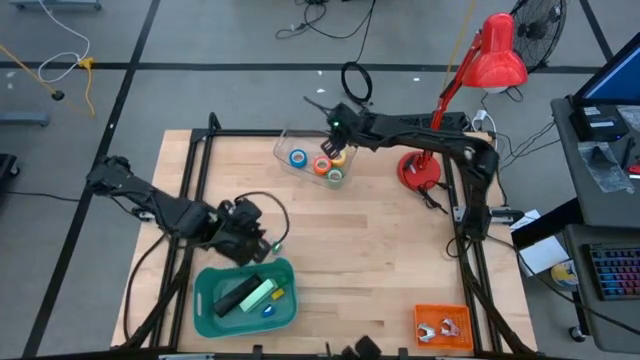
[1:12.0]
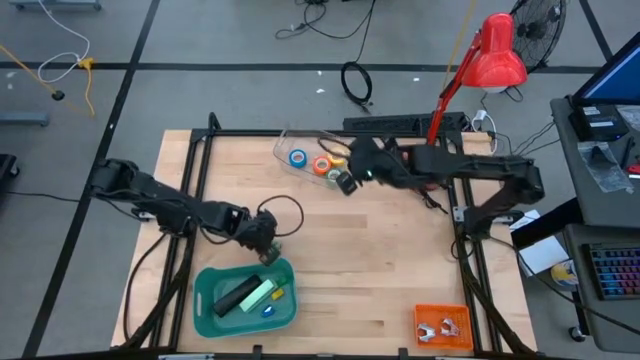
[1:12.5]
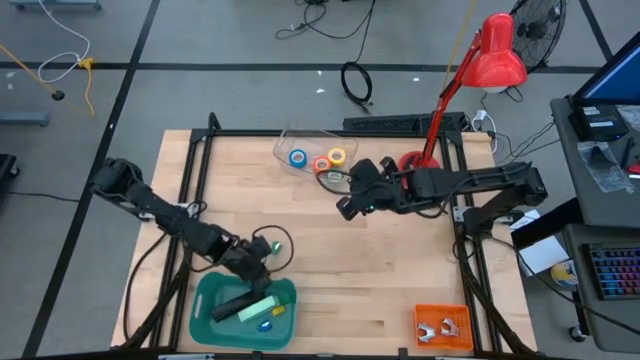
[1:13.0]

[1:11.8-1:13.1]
Task: Pick and place Stapler, Stapler remover, tape
Adjust the green bin

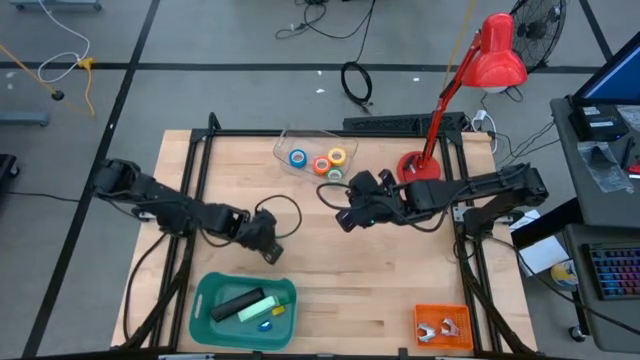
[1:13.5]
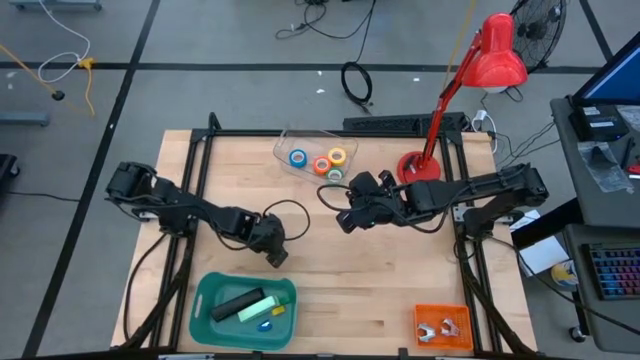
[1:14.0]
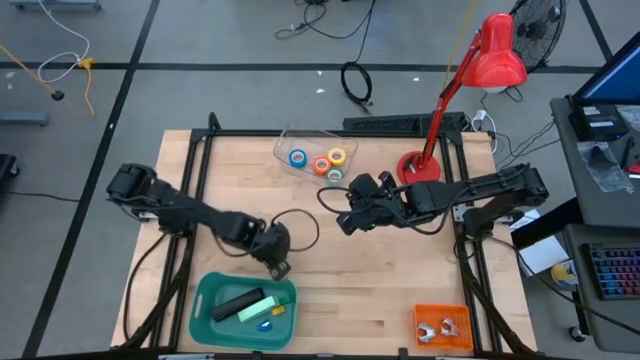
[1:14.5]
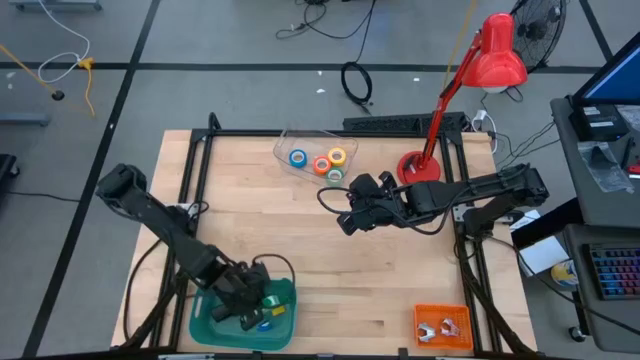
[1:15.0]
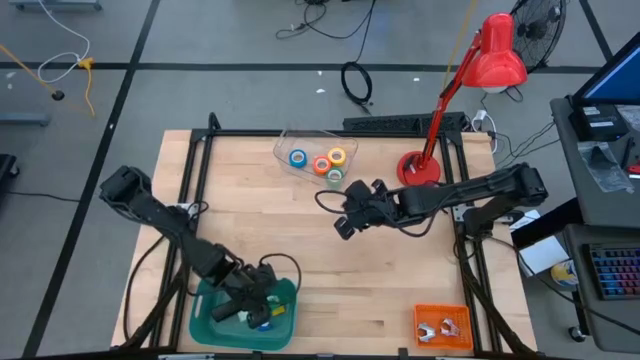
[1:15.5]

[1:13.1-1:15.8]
Put the small green stapler into the green bin

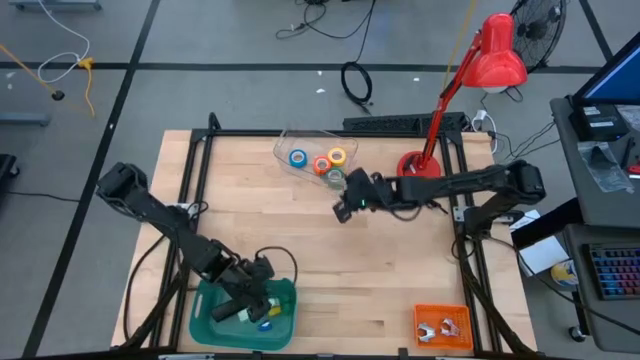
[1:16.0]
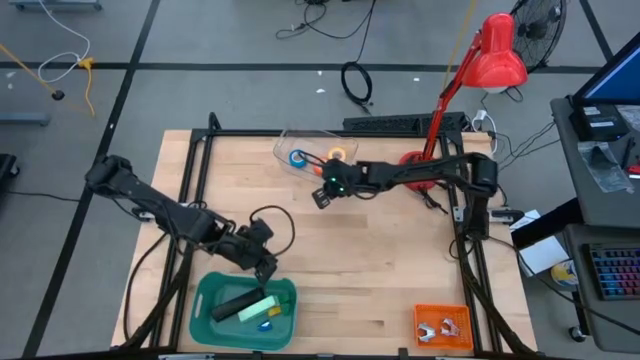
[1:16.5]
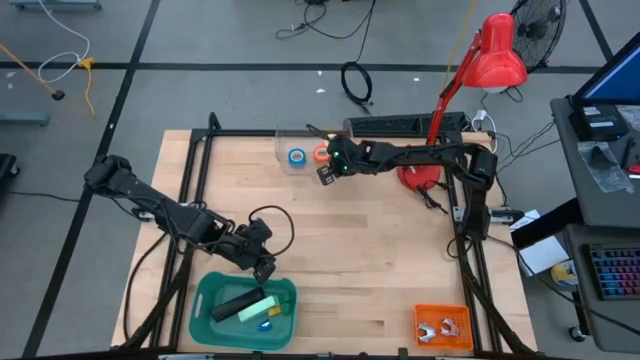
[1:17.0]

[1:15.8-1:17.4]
Adjust the transparent bin

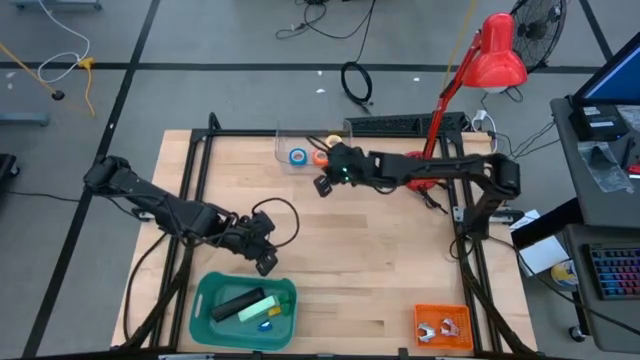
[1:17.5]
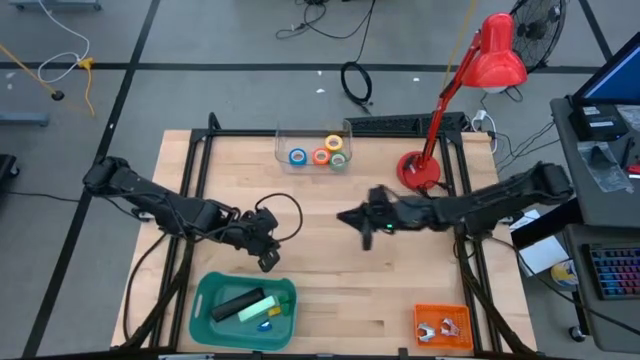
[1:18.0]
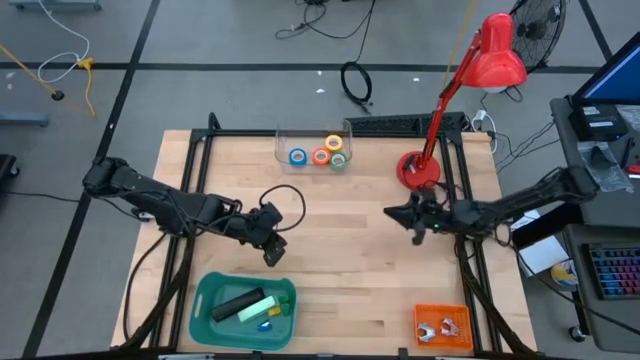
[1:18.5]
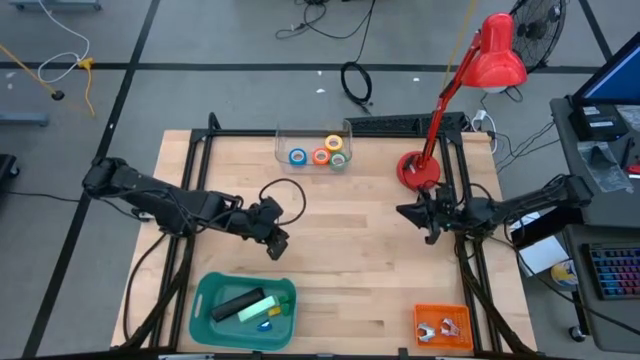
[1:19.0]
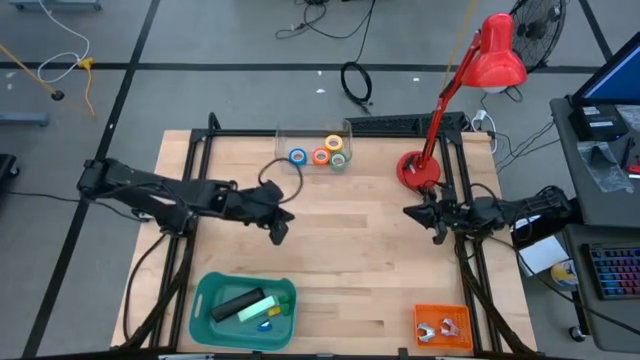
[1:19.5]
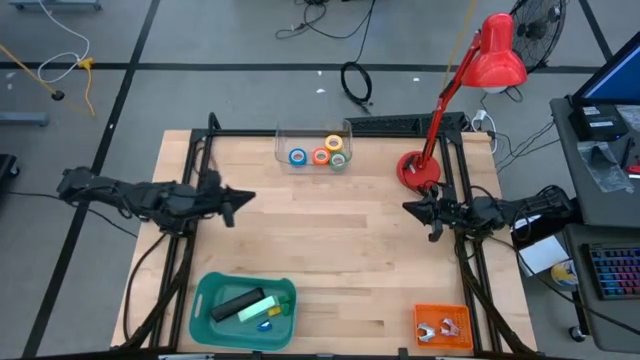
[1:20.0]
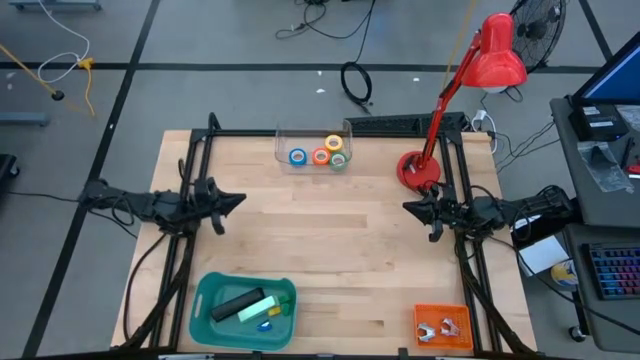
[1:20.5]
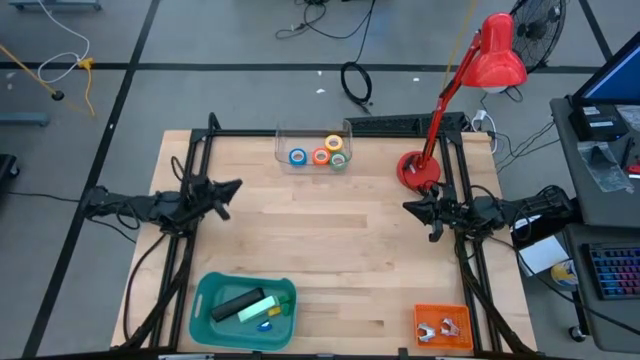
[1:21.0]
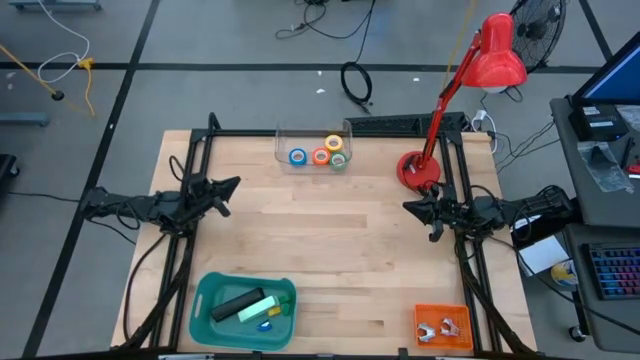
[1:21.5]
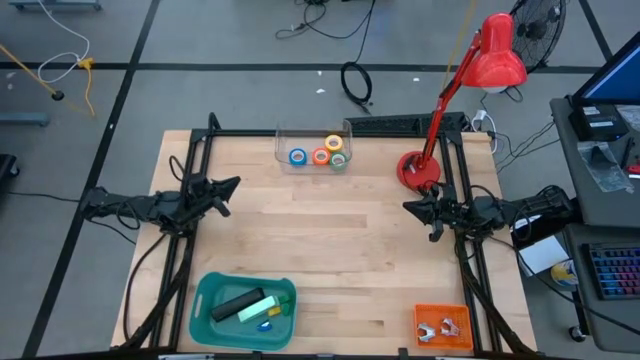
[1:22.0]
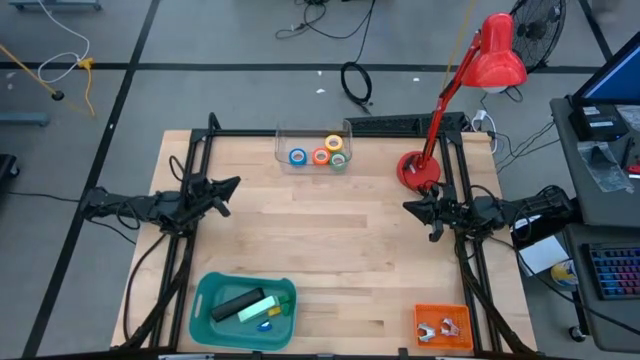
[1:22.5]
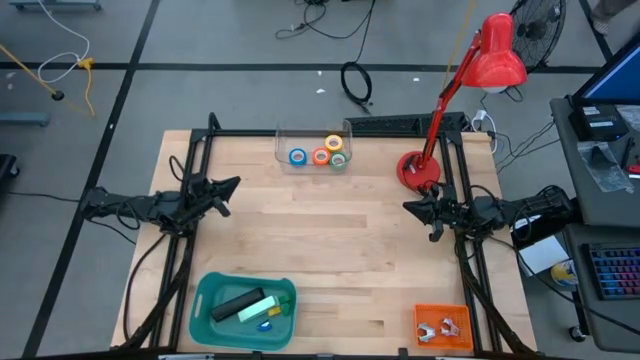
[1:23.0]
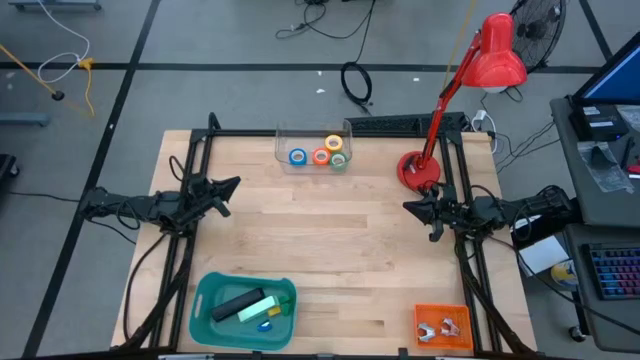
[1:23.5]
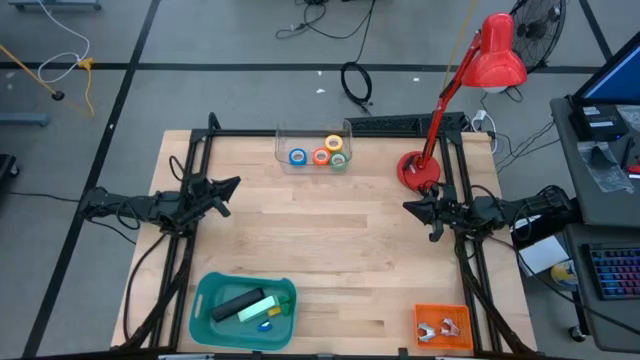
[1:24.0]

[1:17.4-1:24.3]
Return to Home Position

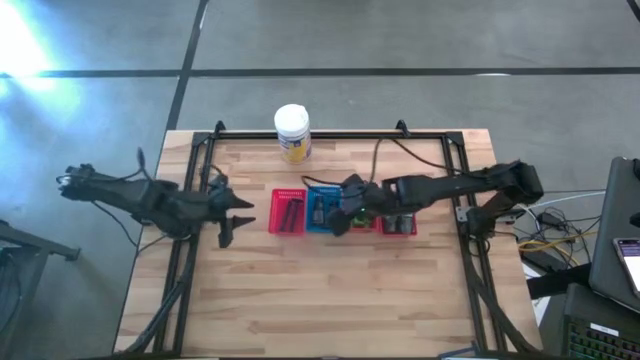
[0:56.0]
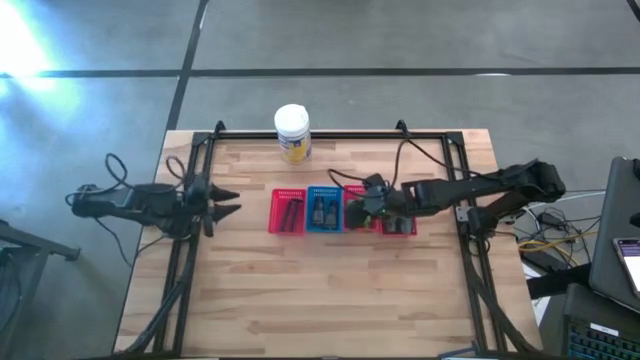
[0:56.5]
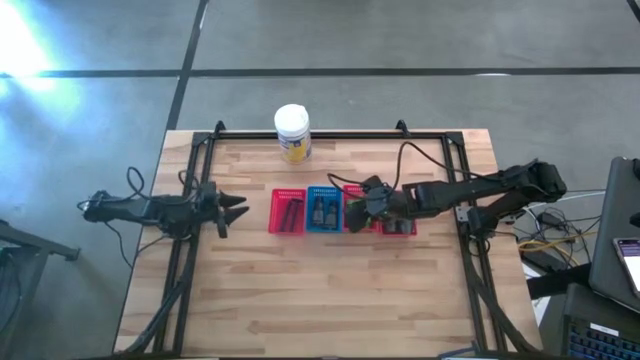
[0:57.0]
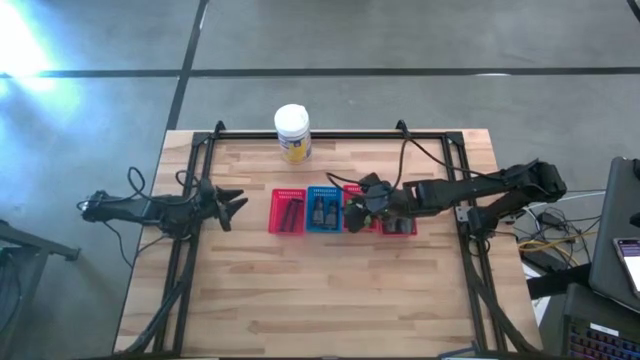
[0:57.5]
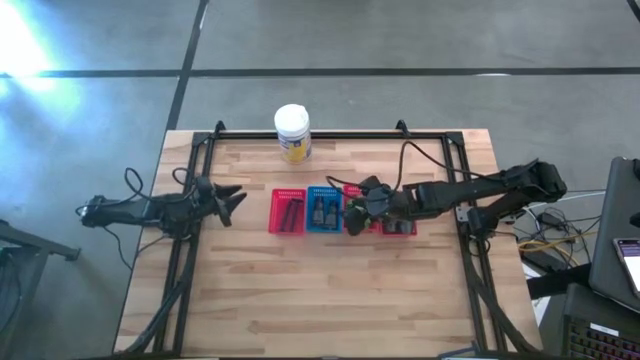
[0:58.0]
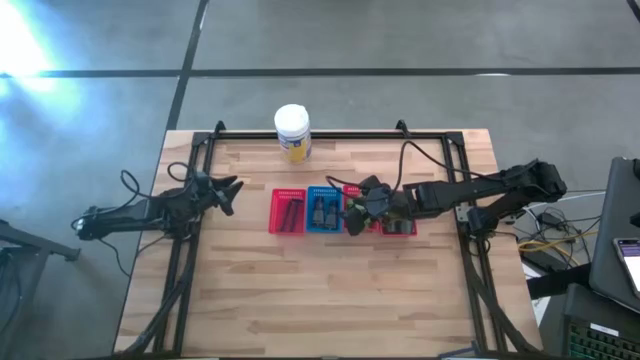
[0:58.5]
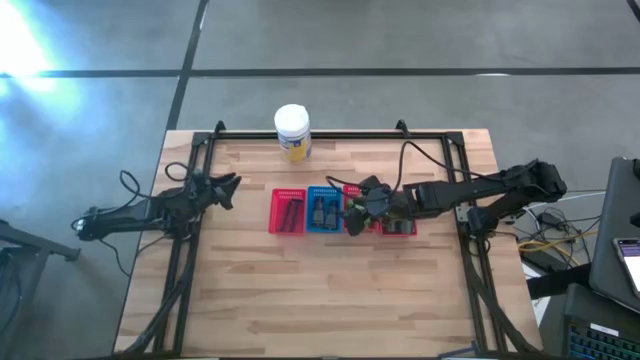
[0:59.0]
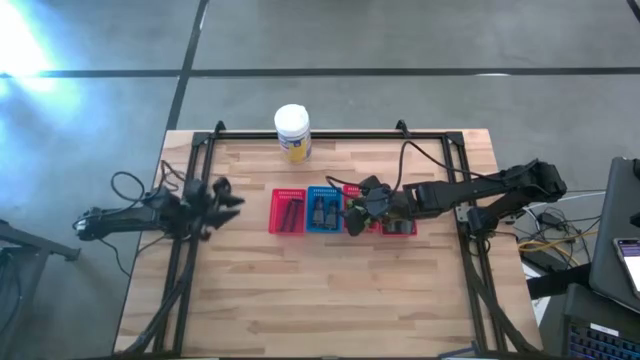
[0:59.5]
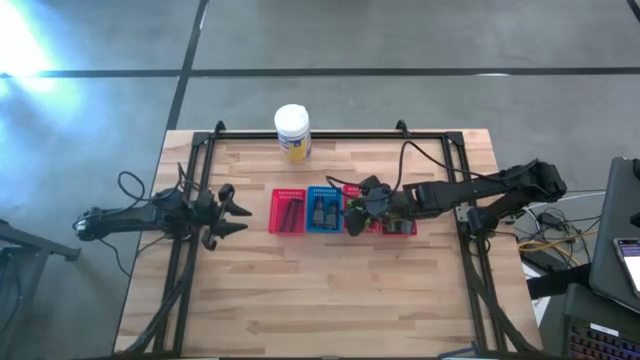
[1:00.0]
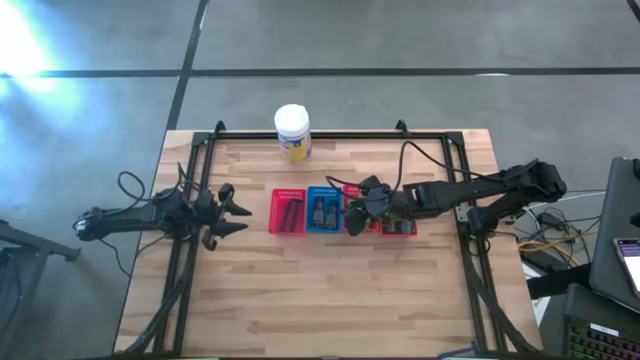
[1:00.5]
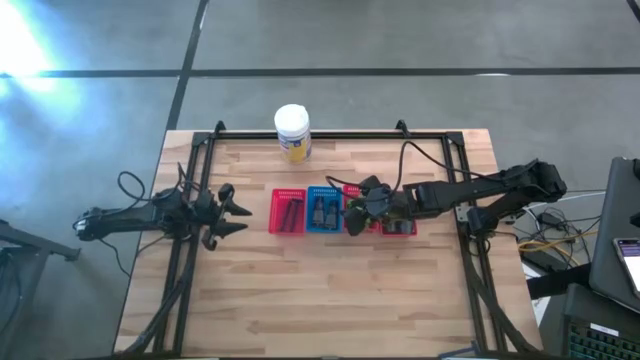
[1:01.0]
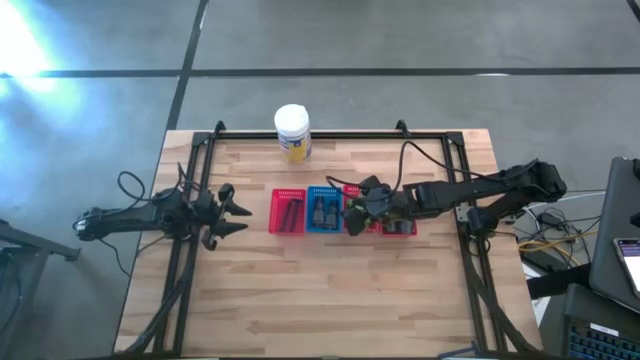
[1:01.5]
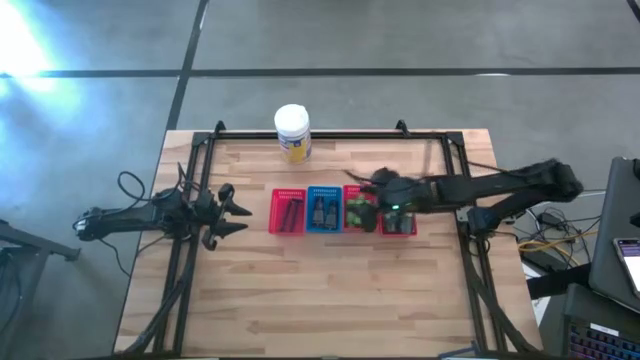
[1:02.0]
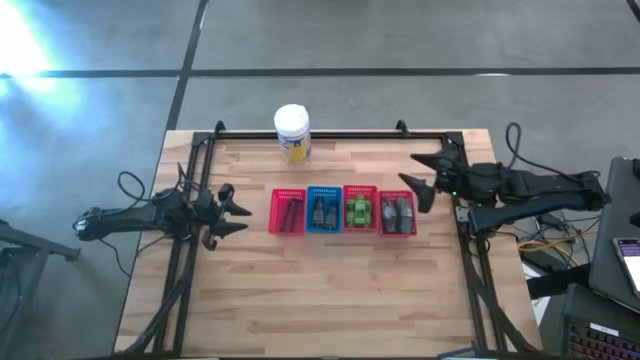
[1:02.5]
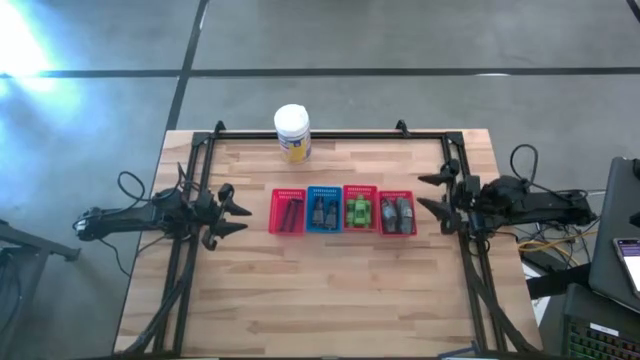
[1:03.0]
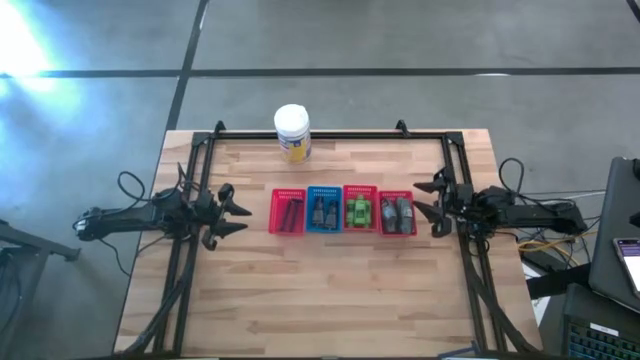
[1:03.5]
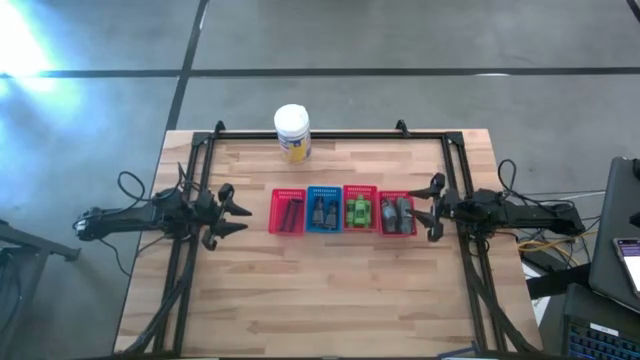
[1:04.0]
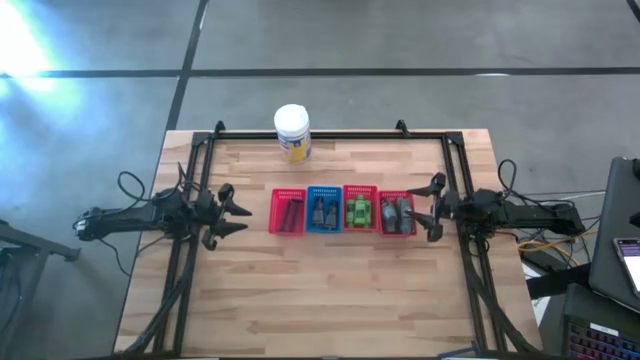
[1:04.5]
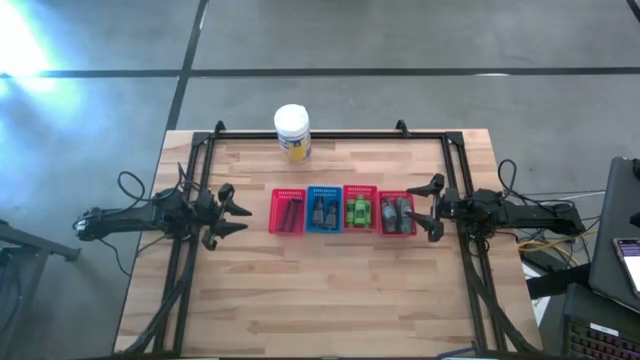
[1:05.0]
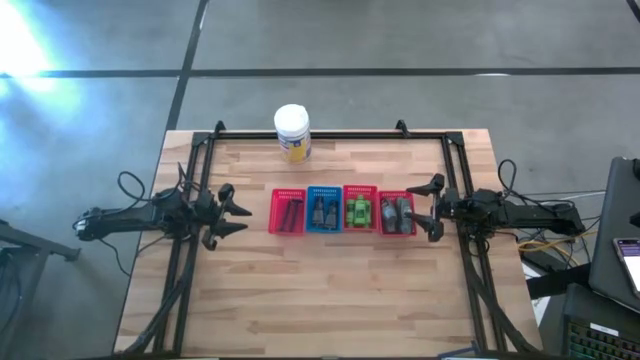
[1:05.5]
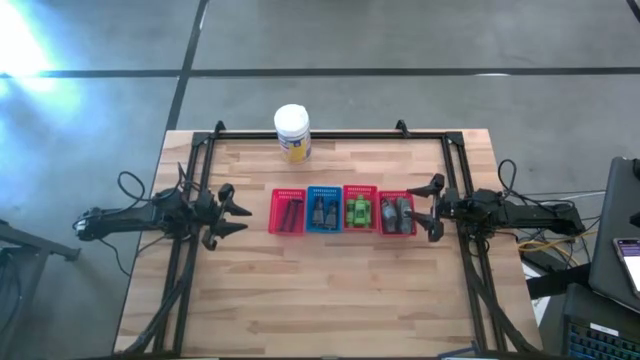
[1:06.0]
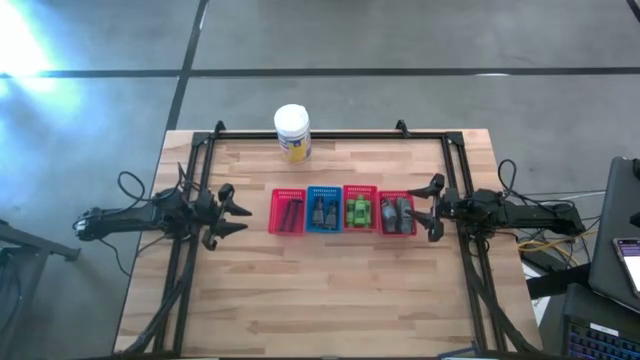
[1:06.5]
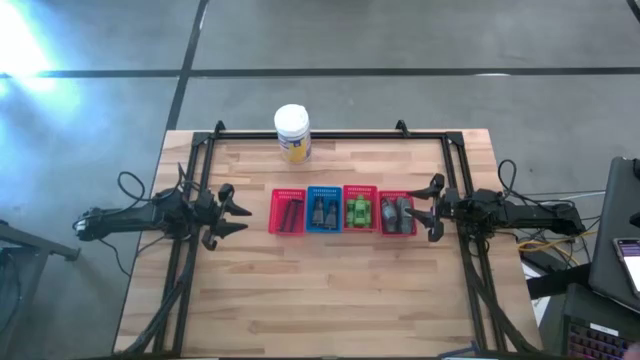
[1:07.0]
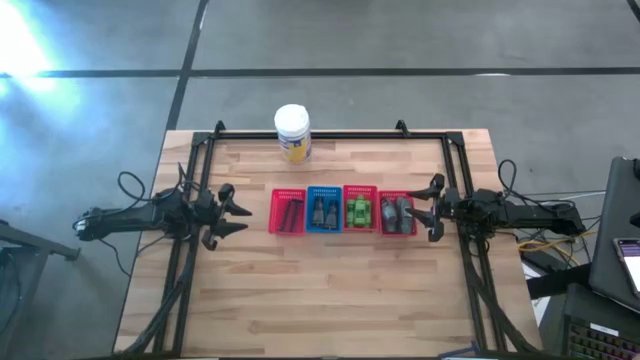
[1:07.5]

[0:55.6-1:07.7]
Task: Pick & Place Travel size toiletries
Return to Home Position
